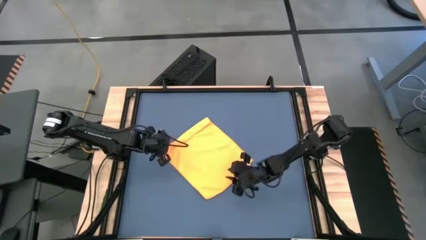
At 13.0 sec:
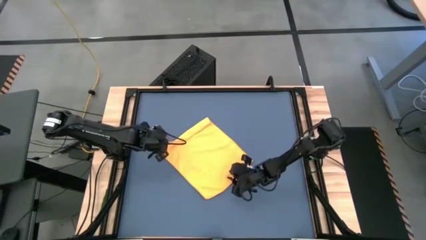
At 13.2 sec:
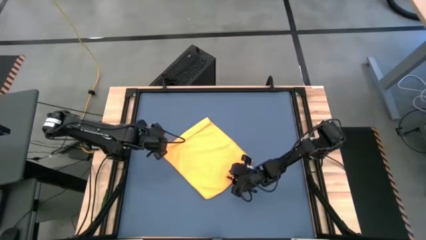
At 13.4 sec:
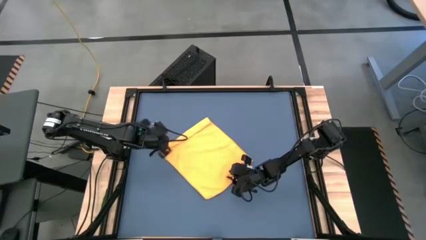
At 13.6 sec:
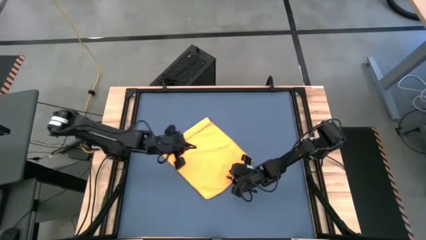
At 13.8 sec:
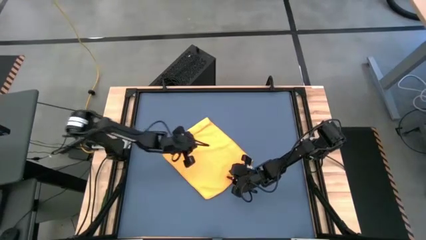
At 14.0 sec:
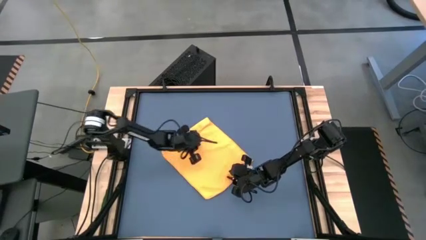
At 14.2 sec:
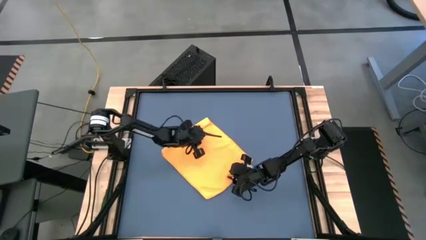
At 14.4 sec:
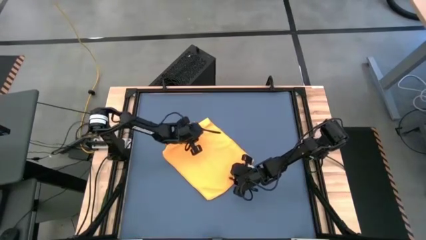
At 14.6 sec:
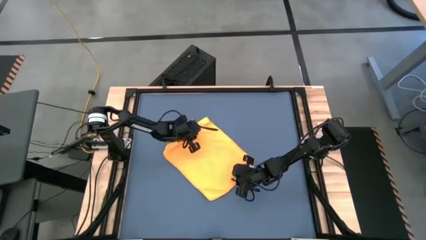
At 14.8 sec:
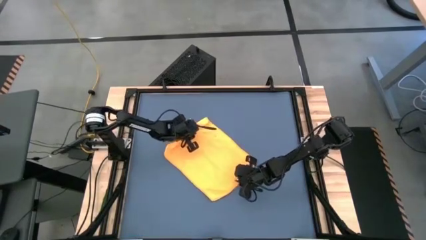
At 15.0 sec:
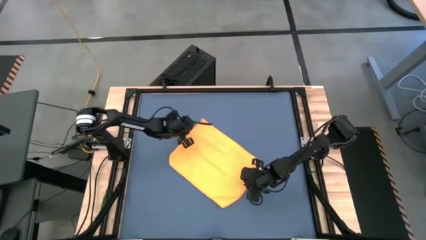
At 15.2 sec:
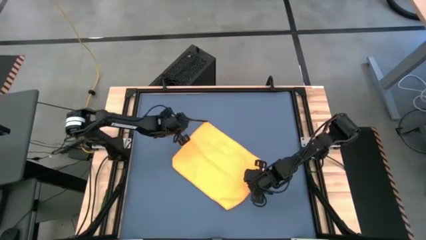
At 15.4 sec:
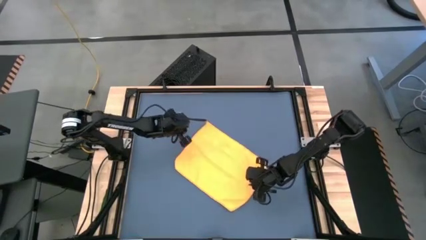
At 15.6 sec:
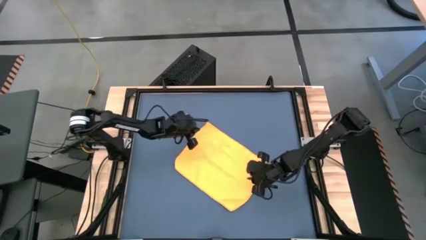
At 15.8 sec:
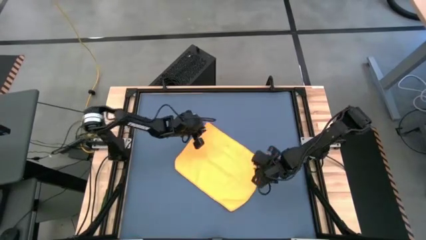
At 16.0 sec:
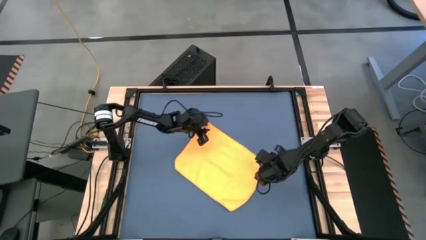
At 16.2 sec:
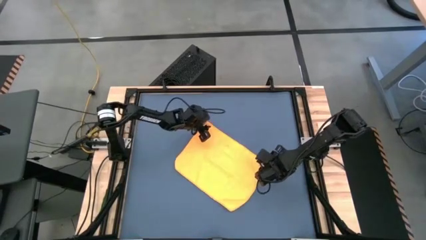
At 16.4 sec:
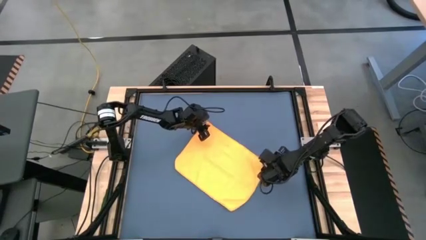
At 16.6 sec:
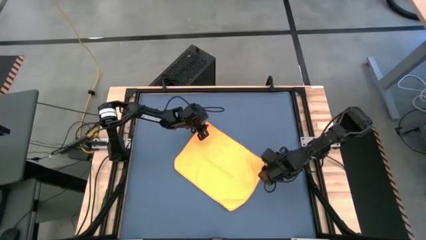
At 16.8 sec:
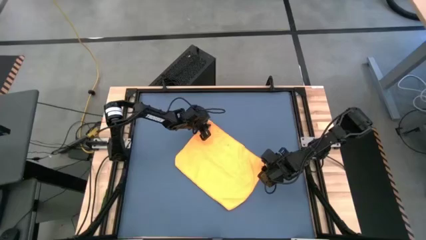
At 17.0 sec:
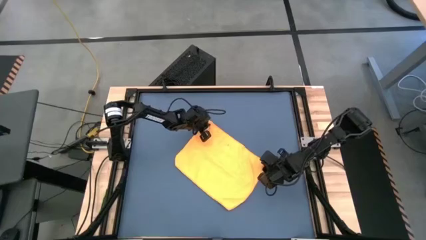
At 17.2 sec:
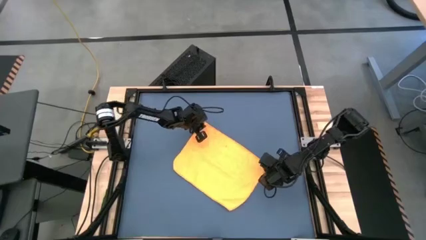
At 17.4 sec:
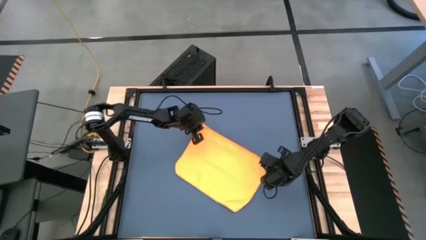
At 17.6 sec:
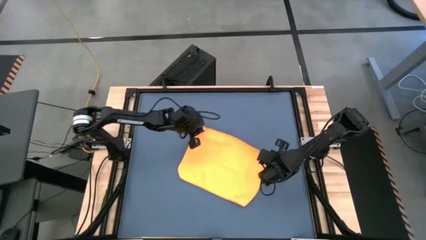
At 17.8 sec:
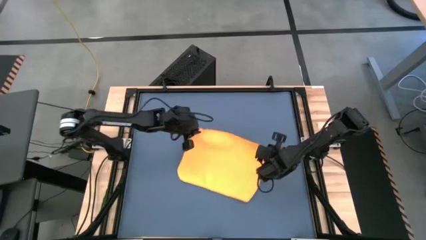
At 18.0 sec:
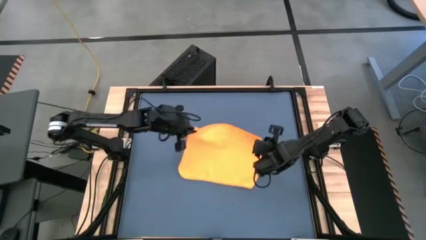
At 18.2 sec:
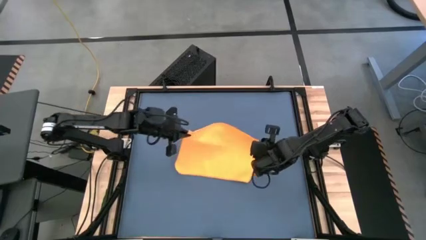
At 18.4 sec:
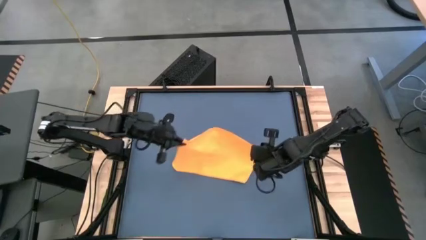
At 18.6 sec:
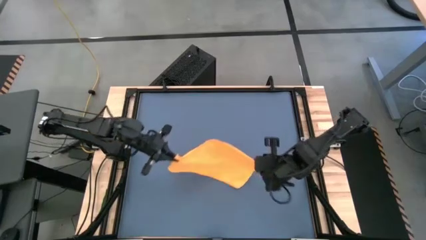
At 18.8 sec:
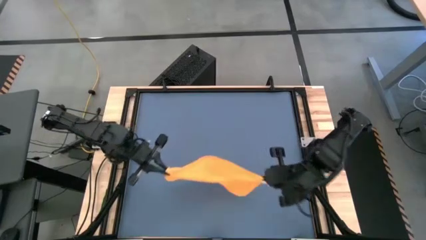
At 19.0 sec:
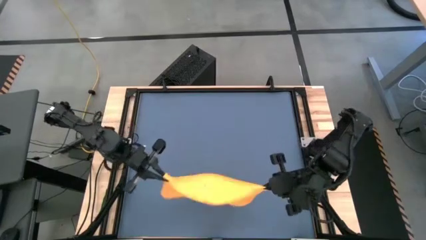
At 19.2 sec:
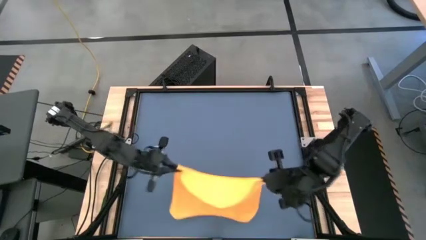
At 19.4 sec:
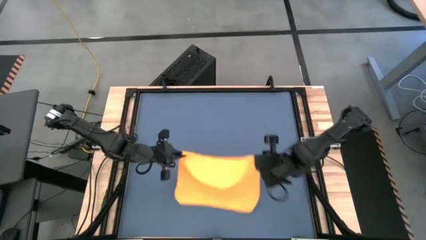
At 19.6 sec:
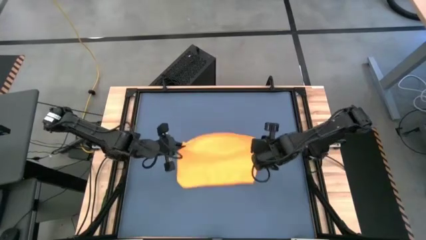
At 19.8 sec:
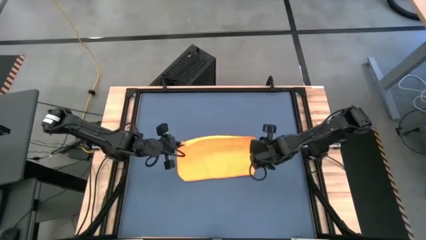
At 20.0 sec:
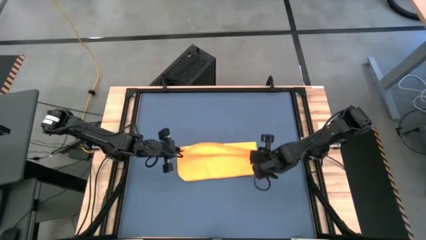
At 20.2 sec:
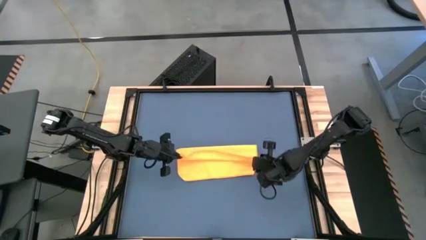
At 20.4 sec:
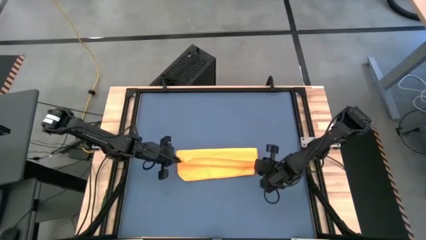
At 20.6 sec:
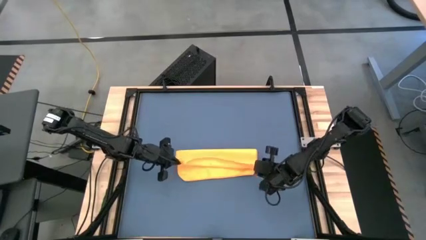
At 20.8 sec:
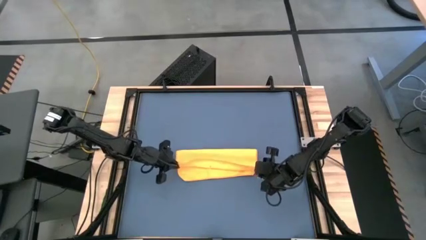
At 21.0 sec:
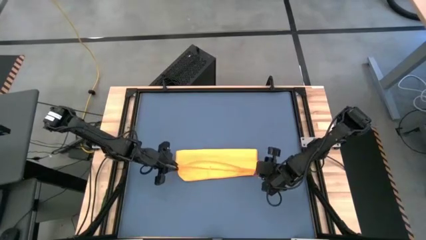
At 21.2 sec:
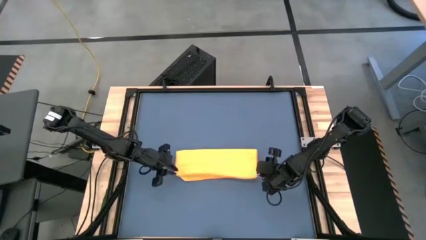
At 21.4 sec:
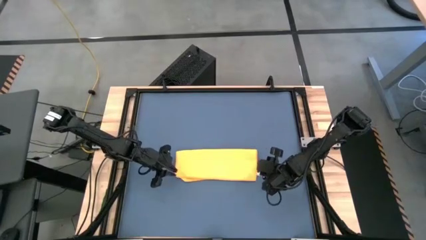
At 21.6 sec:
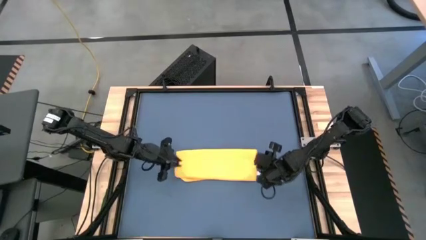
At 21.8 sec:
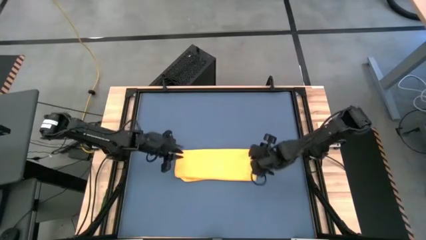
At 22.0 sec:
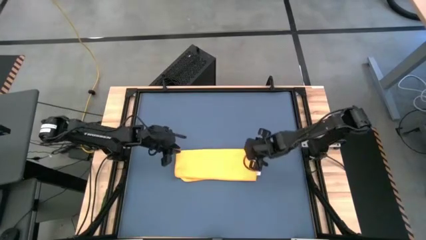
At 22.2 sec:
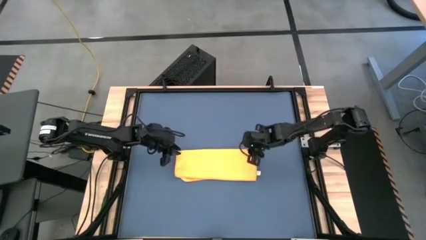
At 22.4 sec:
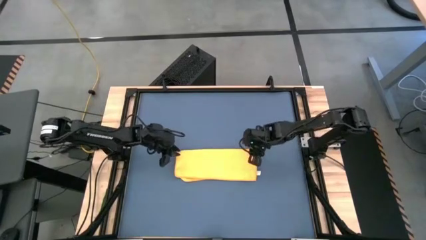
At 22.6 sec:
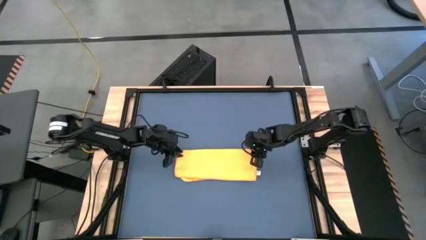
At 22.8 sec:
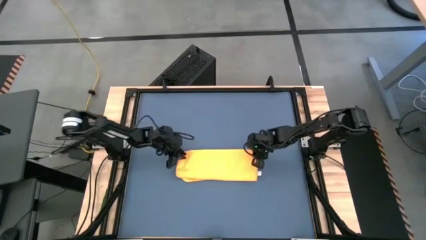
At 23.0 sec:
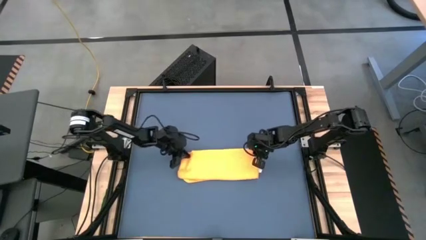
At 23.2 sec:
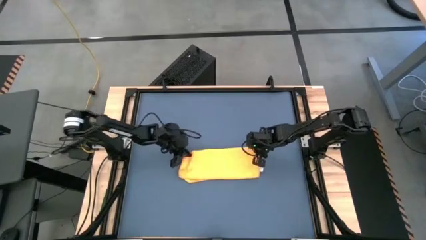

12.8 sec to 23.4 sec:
Task: Roll towel
Fold the orange microfiber towel

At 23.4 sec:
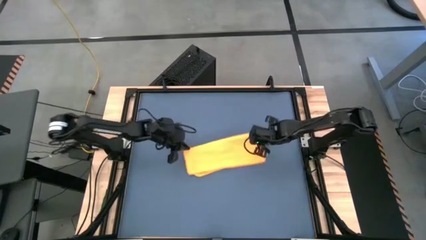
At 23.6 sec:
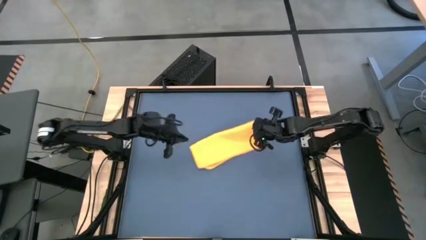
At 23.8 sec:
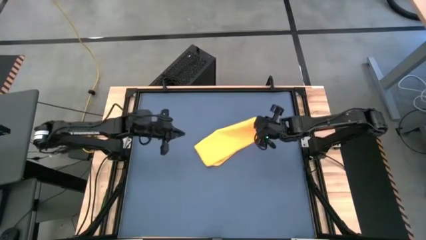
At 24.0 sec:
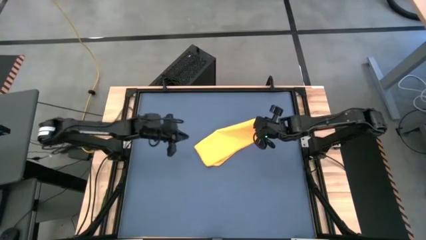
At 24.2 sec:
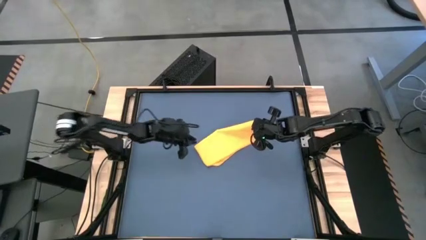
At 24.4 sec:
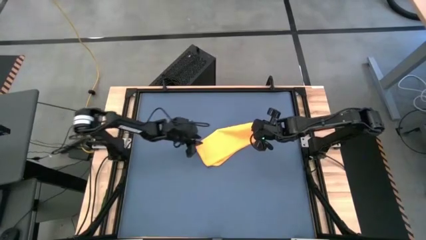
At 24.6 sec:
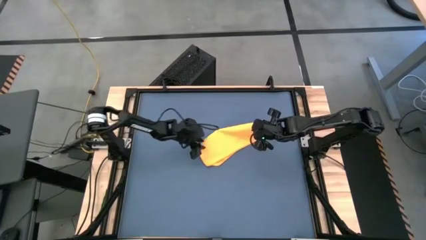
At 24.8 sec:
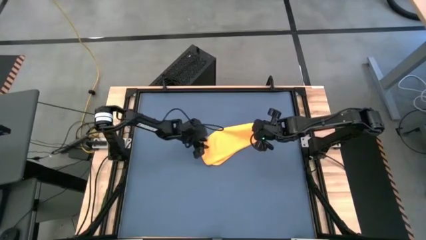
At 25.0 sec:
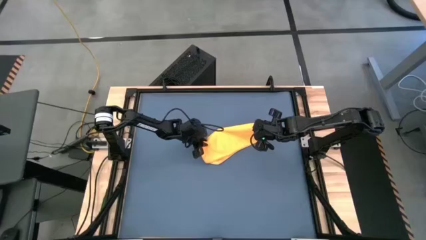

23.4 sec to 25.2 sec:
Fold the orange microfiber towel
